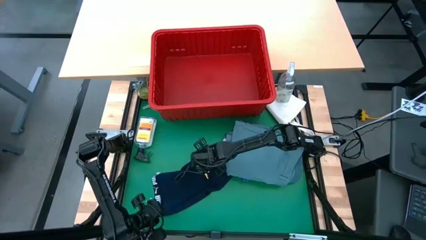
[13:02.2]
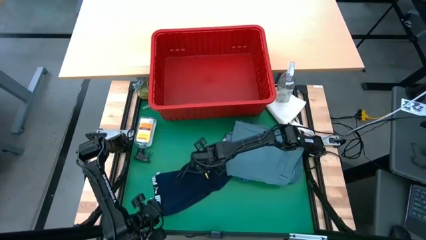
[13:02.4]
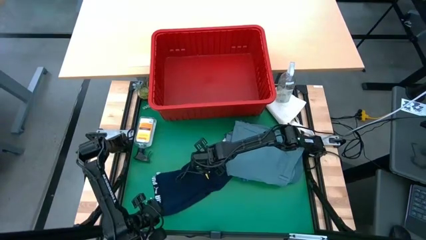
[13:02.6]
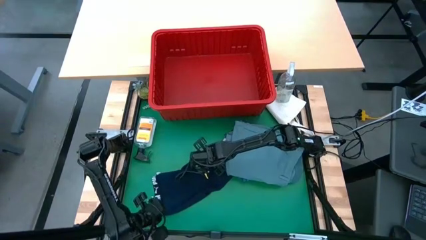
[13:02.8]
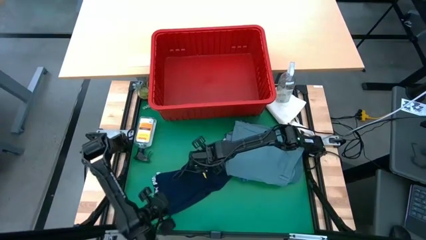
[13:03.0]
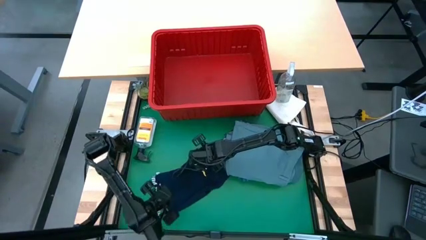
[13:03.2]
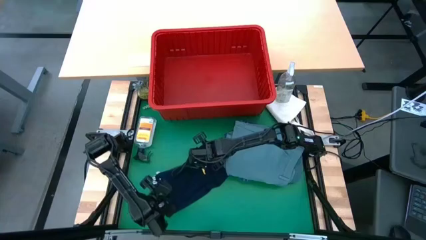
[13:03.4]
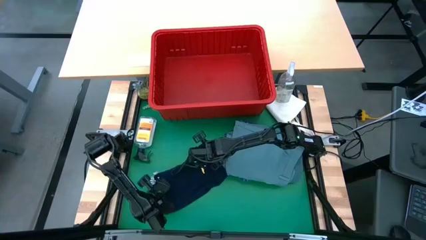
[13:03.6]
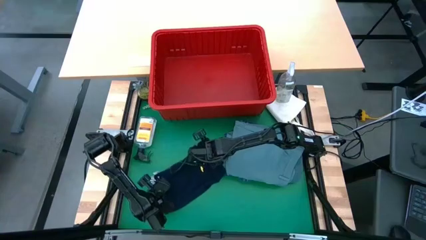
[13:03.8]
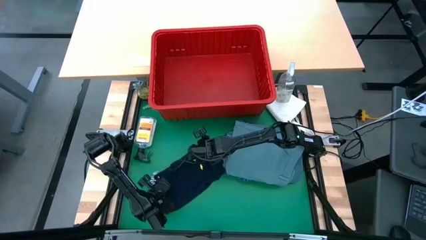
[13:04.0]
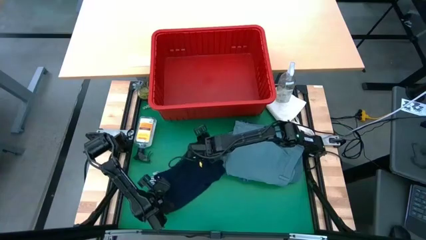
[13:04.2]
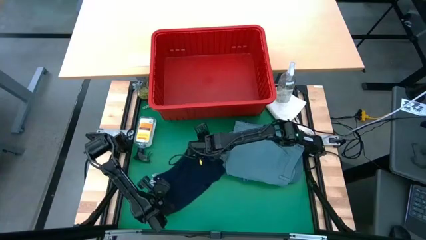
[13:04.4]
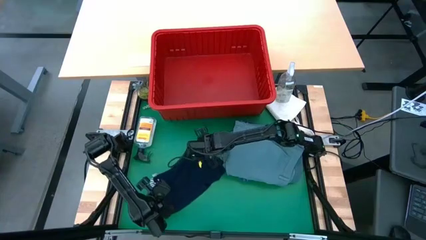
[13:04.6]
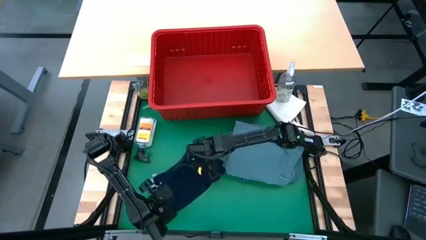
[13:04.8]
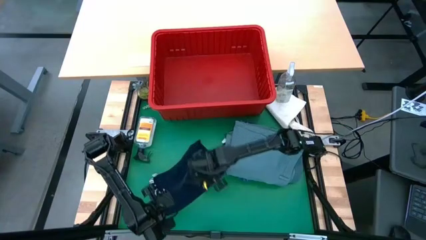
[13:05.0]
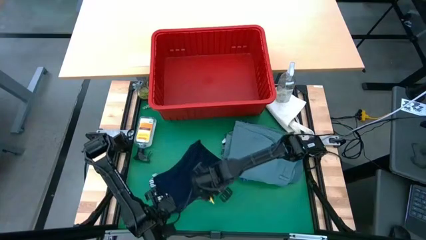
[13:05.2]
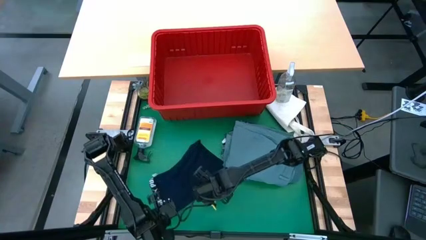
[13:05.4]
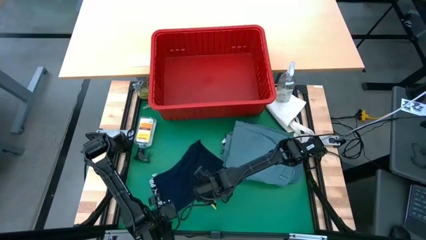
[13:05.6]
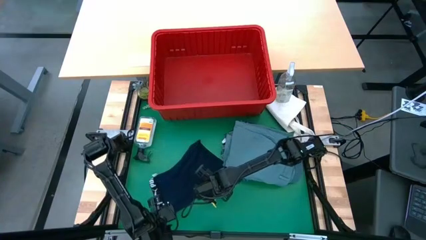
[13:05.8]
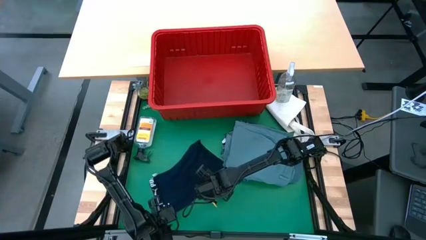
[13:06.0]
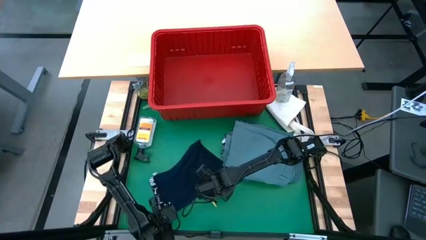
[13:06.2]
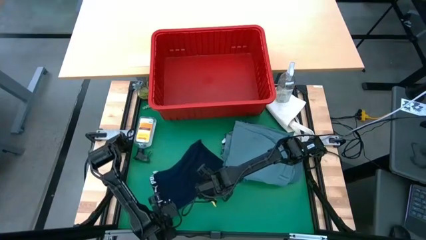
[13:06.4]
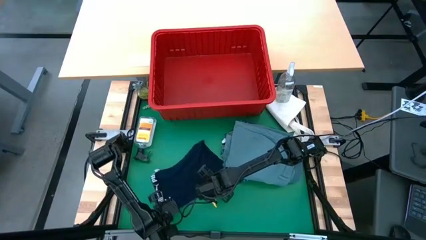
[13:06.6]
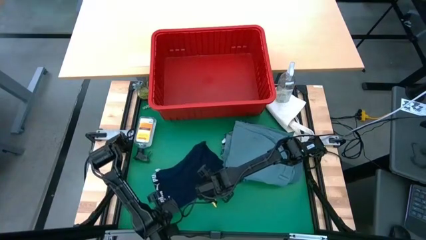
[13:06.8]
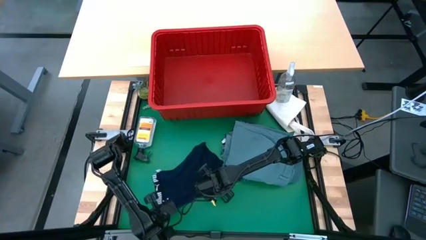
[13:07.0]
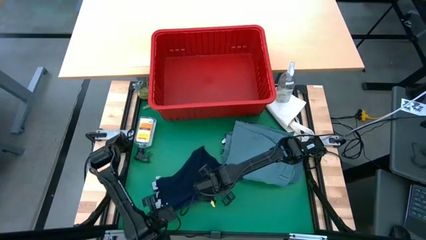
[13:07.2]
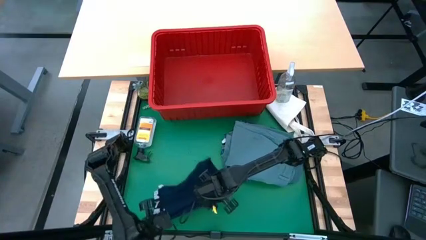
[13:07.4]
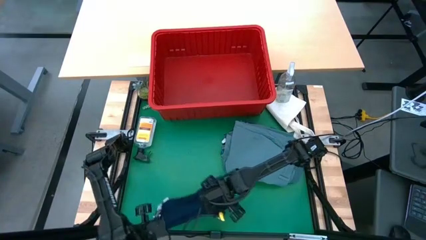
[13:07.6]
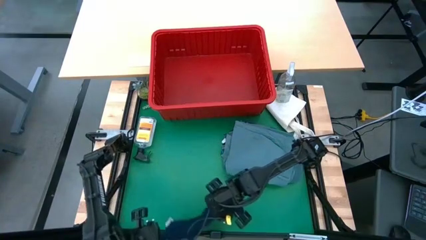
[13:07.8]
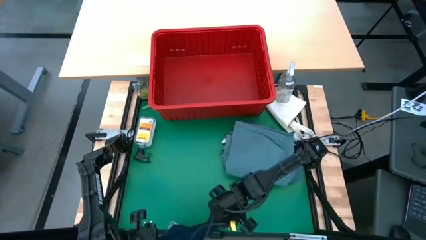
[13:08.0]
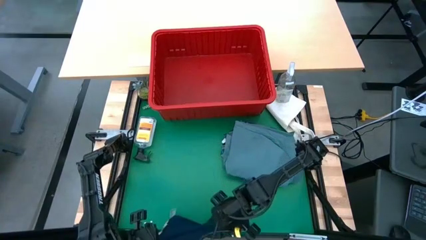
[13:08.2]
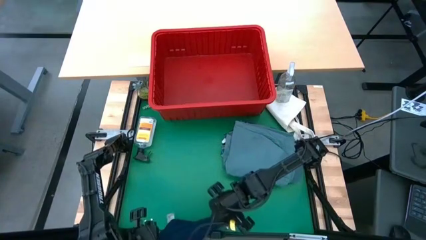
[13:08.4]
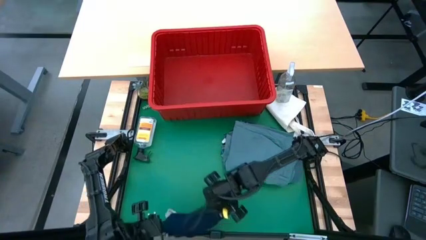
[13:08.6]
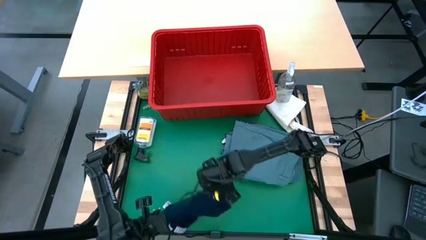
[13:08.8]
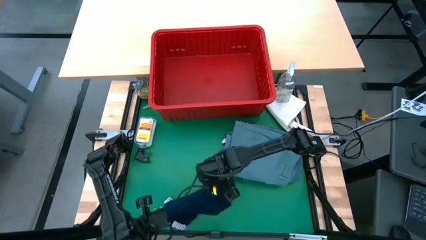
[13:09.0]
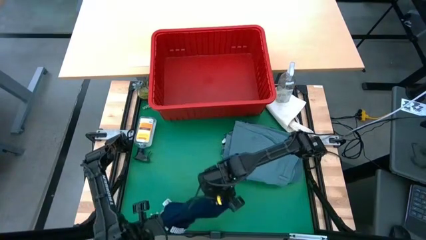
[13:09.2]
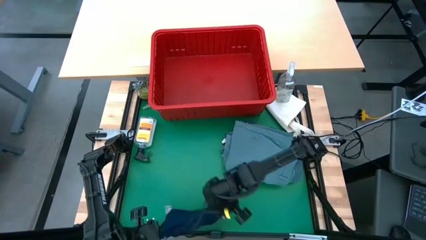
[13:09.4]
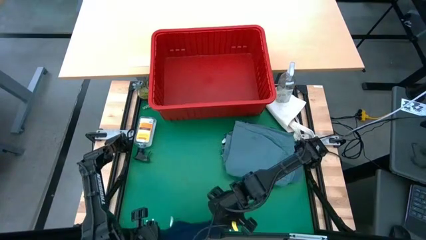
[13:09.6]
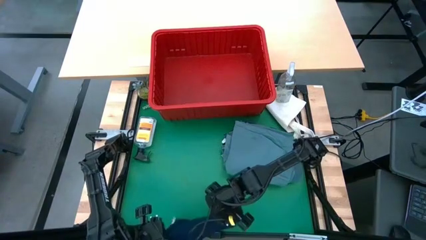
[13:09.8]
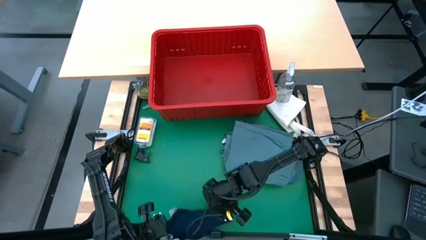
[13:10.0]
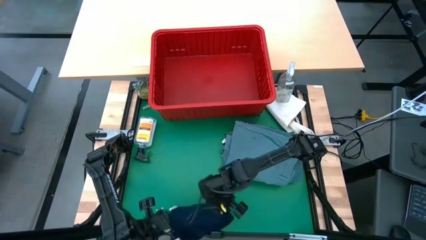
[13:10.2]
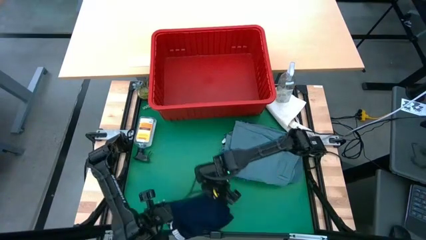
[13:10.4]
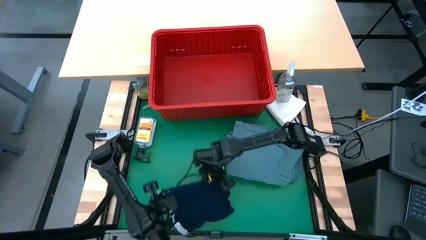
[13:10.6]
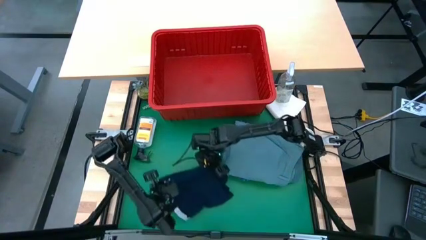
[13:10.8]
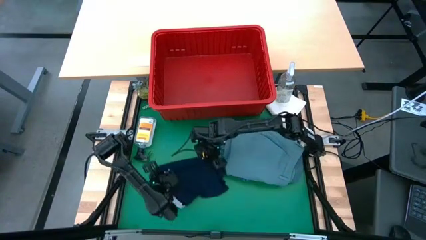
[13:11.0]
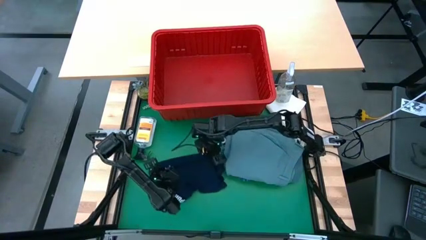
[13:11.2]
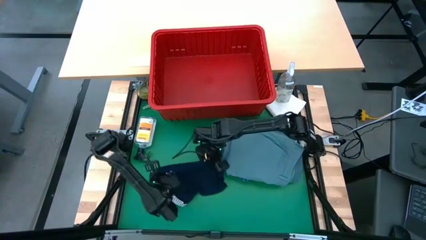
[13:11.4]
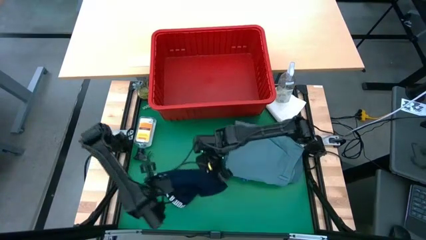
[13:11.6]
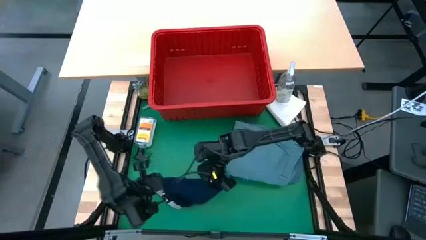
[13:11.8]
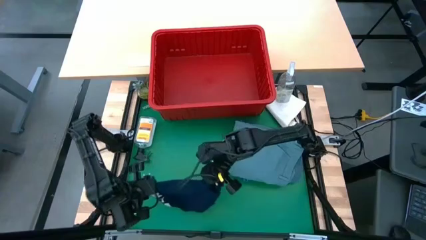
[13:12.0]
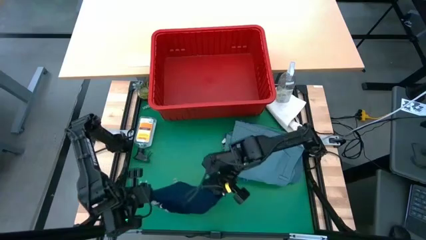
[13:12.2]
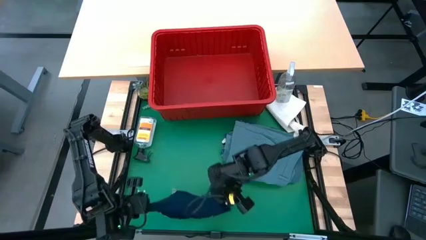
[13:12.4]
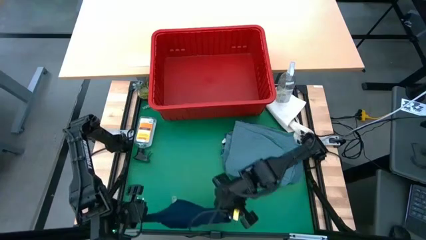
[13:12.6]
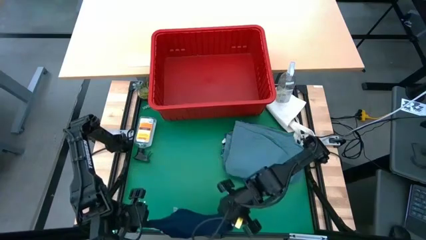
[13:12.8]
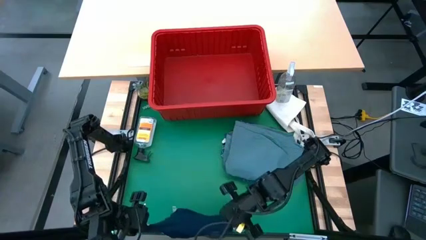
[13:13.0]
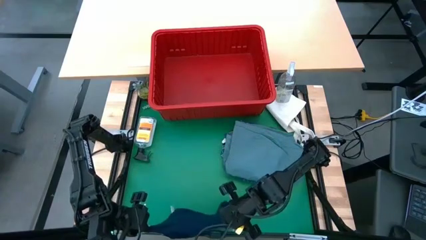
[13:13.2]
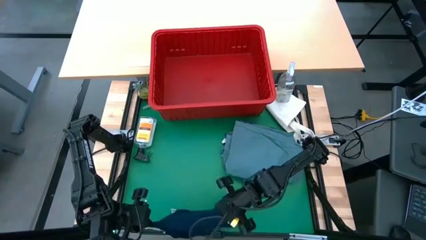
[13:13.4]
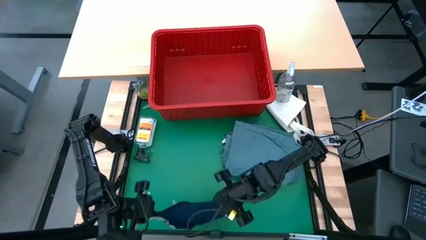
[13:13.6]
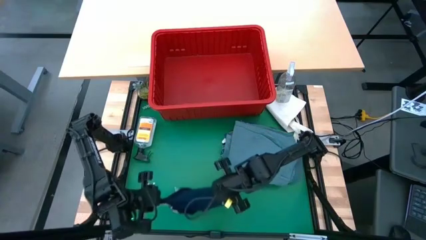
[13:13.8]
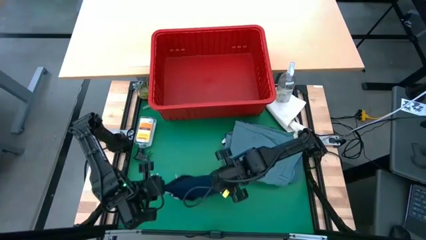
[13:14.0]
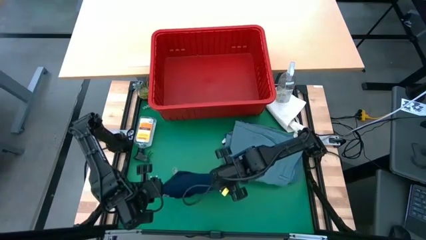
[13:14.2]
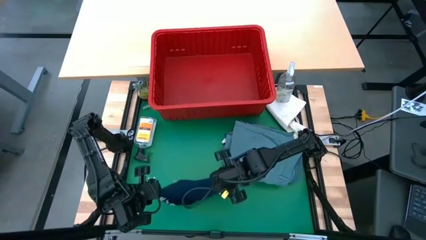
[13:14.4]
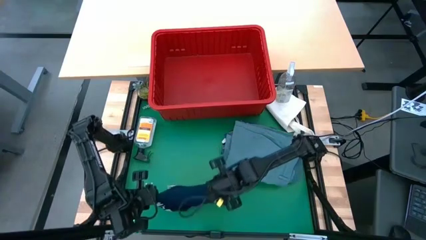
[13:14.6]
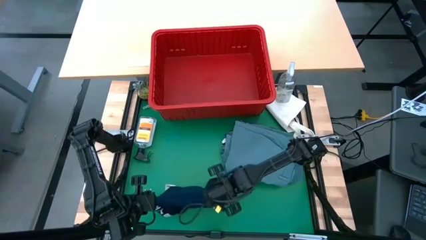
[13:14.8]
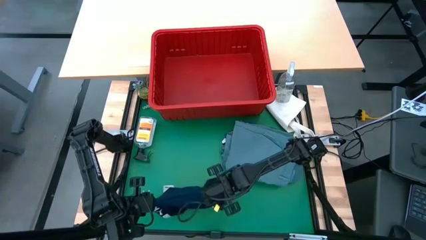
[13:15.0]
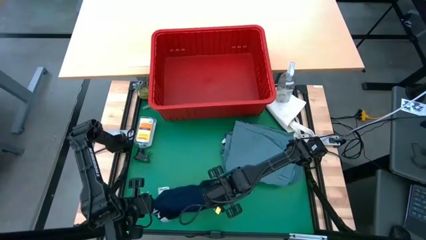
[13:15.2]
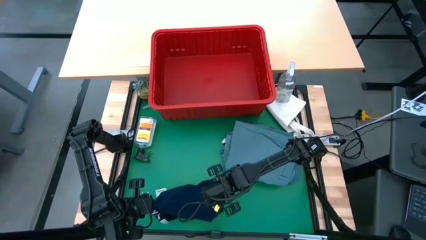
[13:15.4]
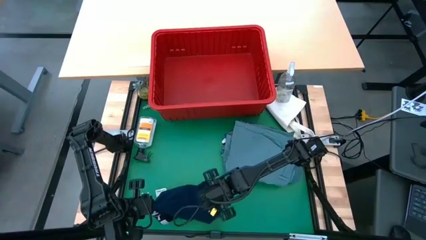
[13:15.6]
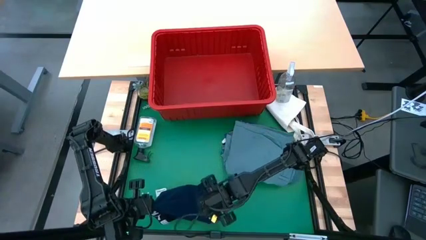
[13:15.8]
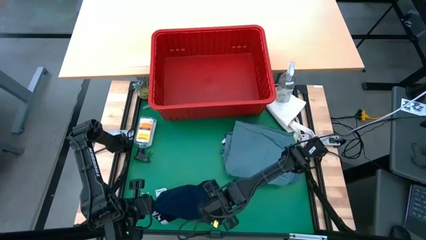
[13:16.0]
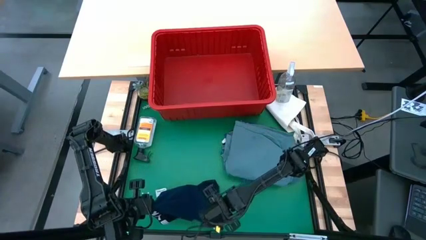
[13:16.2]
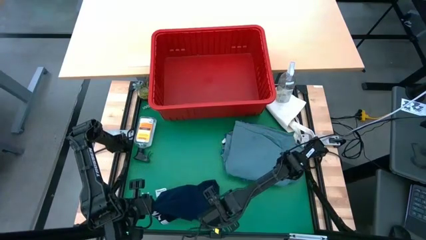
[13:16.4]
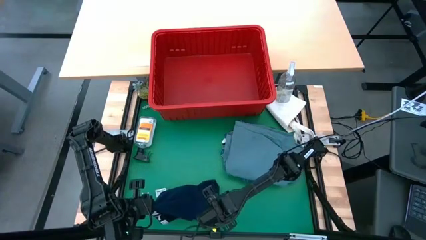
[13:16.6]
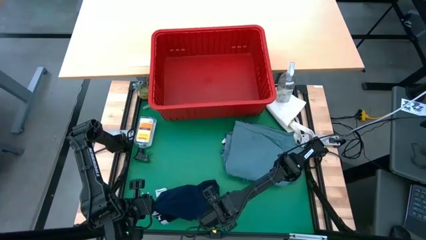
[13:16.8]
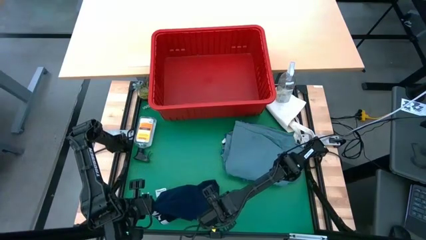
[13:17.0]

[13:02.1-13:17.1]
Task: Fold Laundry from Bin
Fold the dark blue underwear shorts
